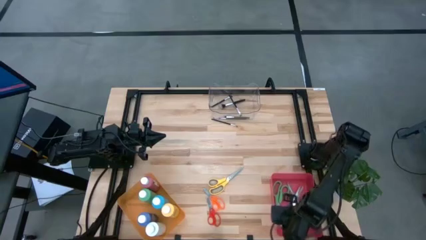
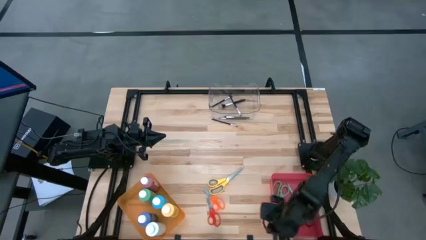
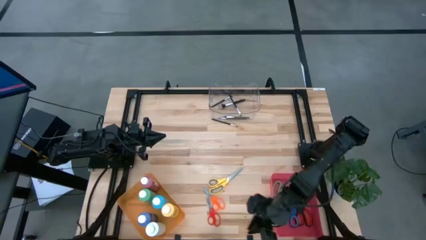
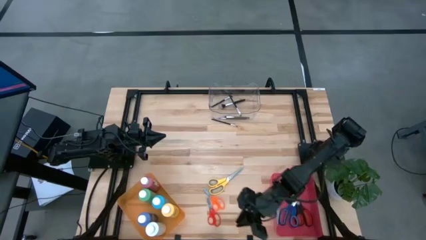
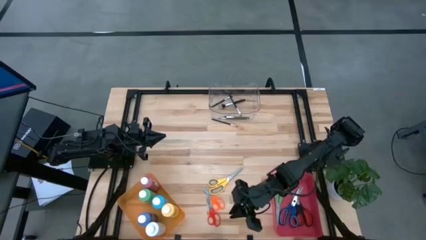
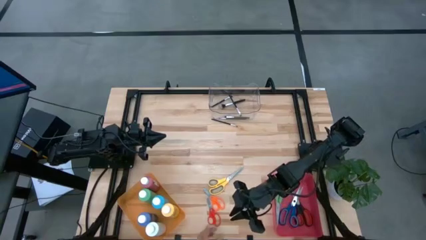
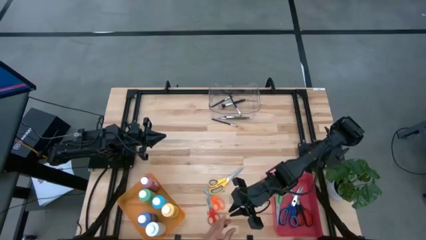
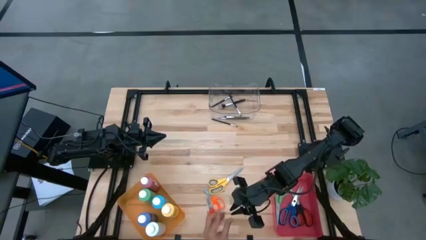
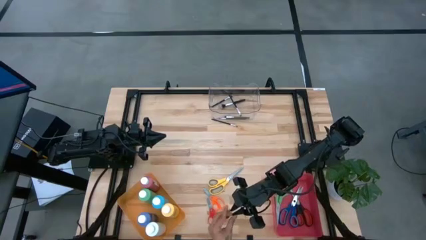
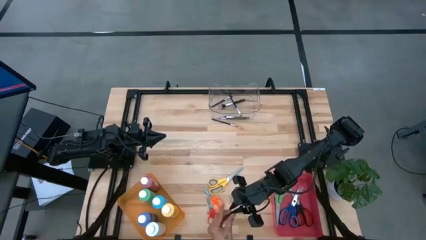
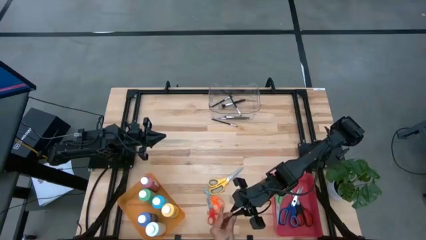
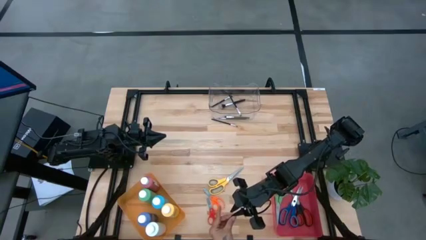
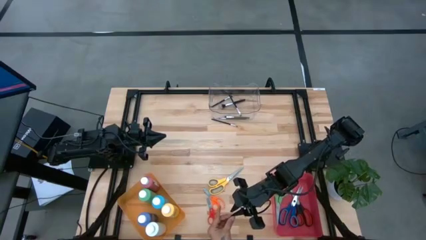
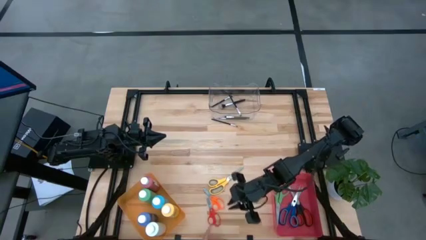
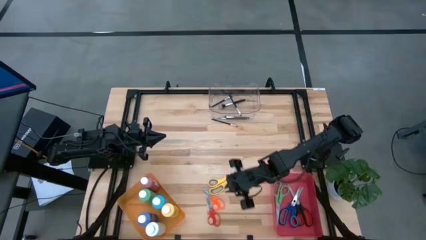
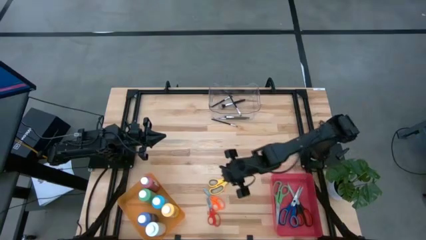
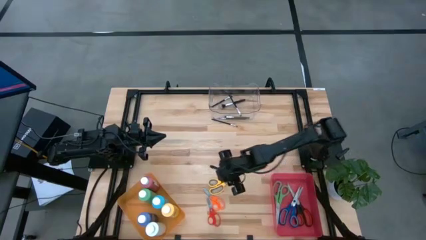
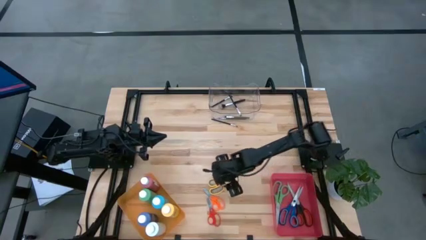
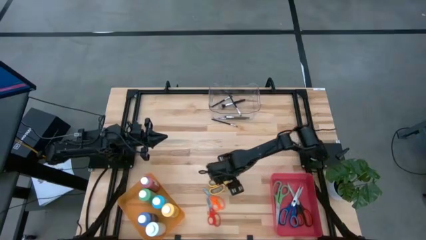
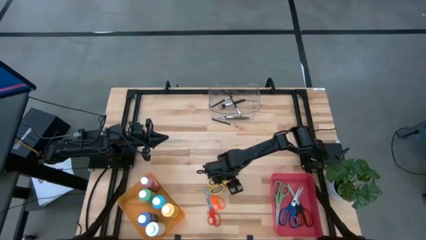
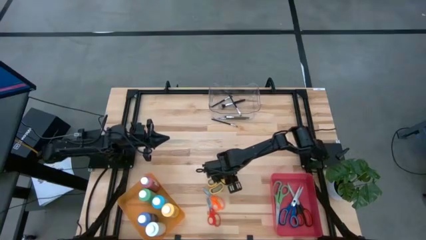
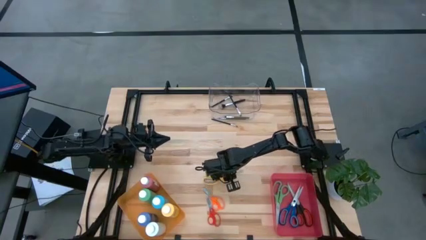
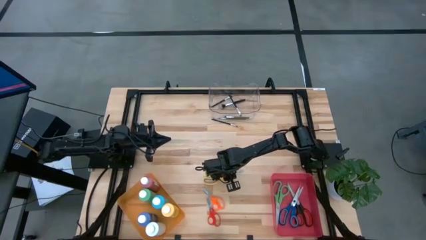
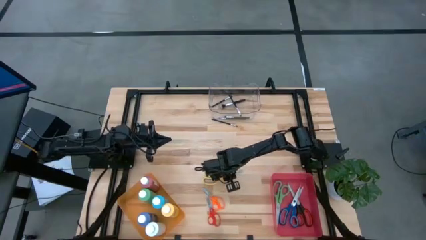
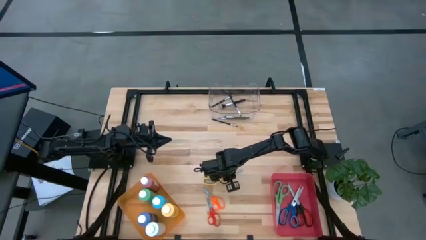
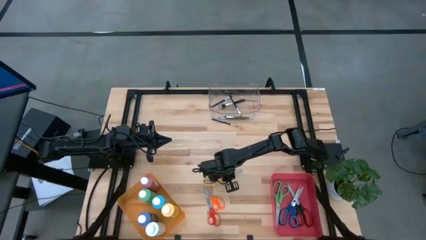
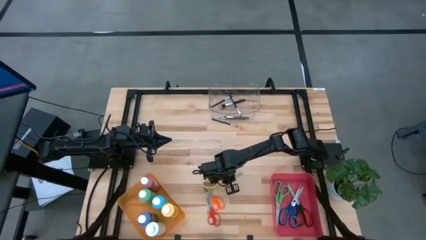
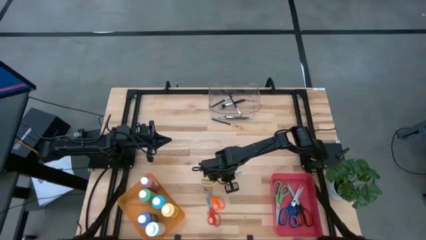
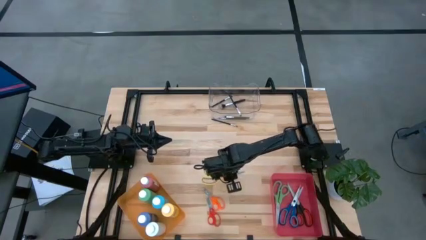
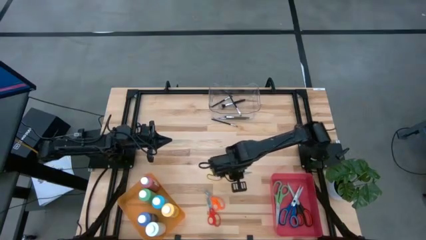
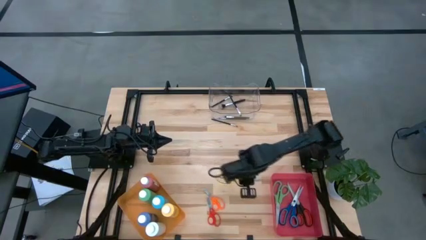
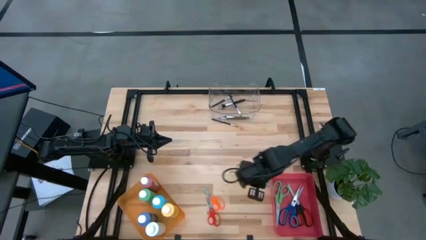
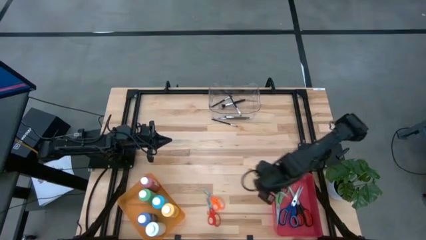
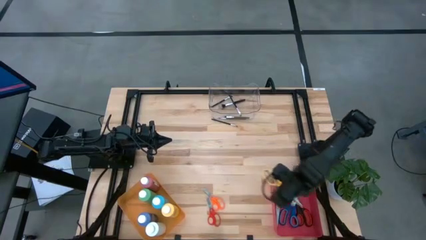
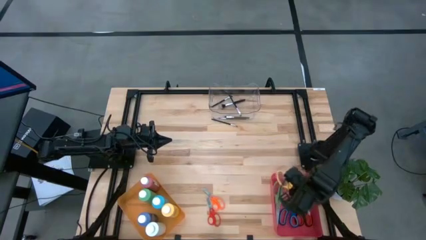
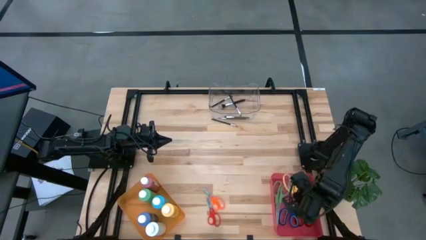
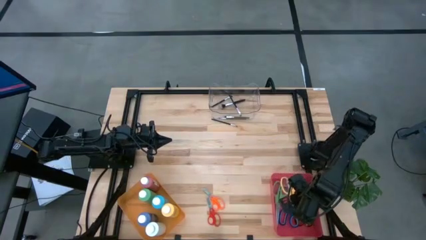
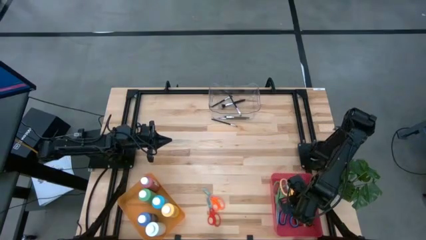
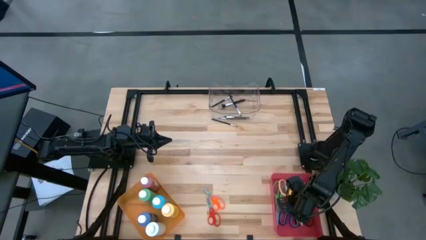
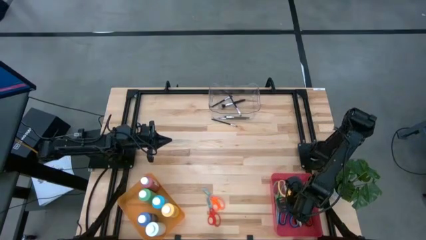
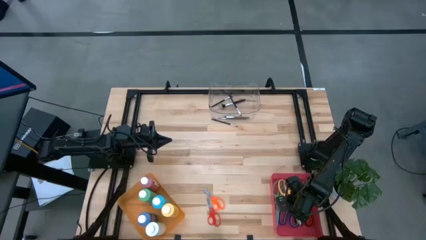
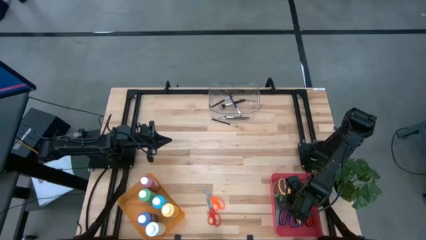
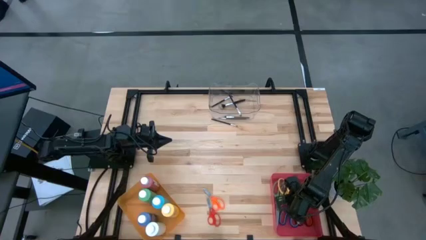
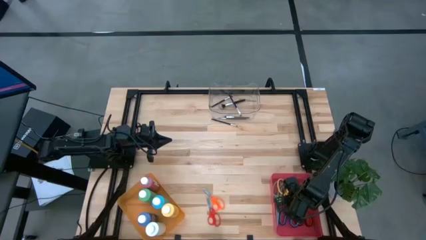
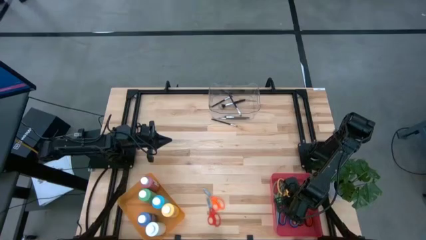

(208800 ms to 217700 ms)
Task: Pick & Place Paint Supplies
Put the yellow scissor into the red bin

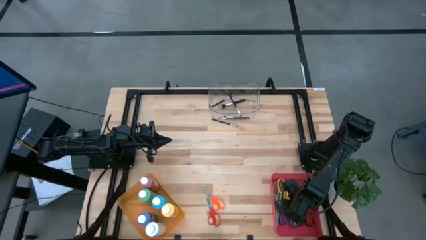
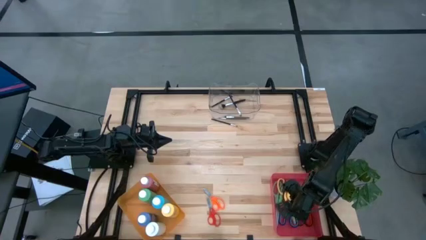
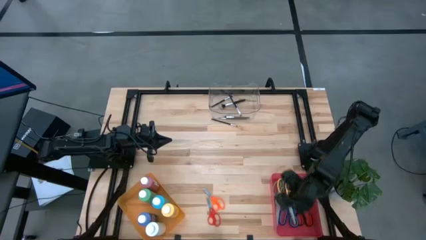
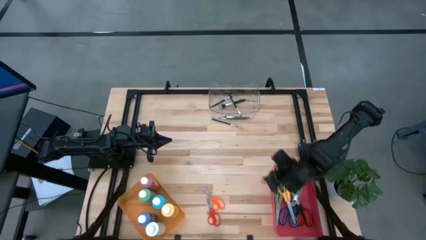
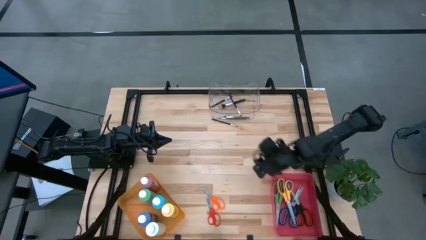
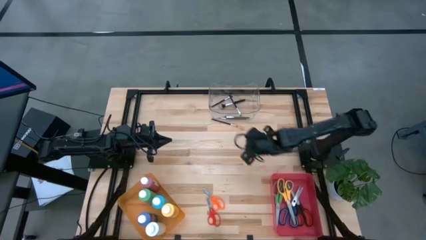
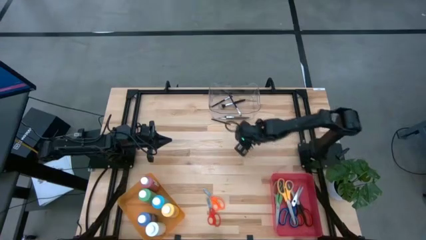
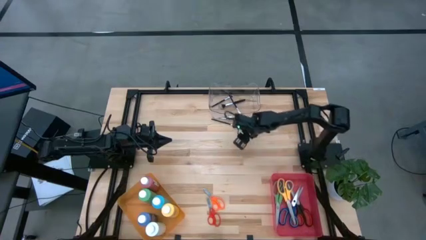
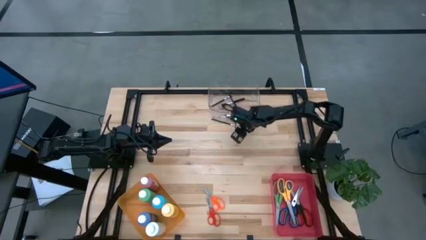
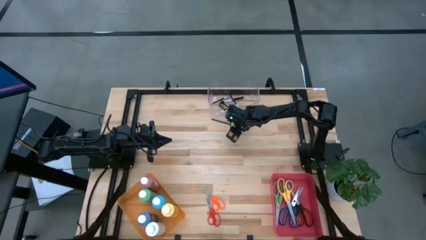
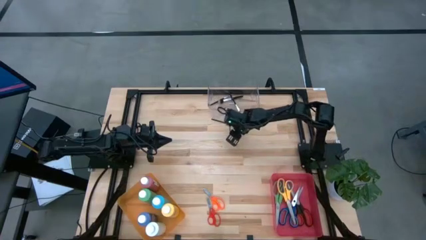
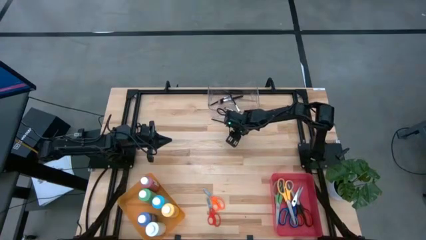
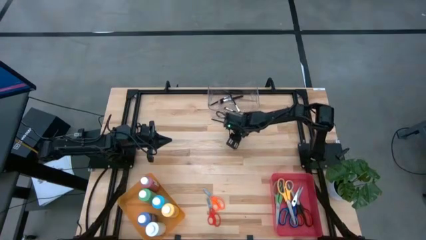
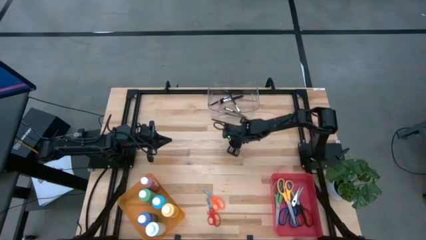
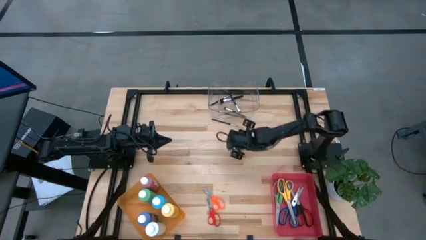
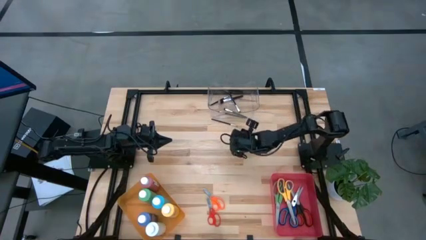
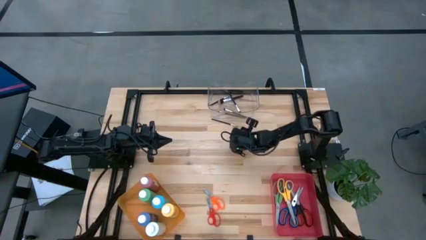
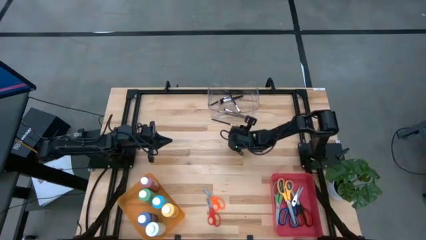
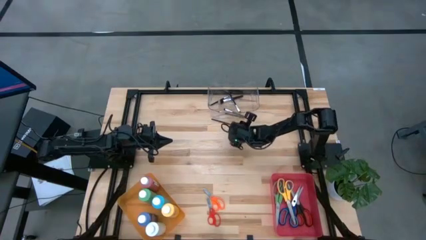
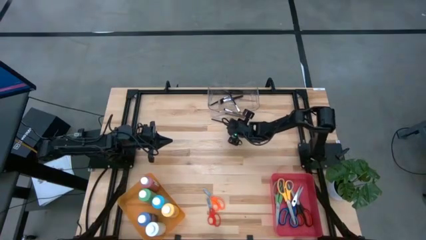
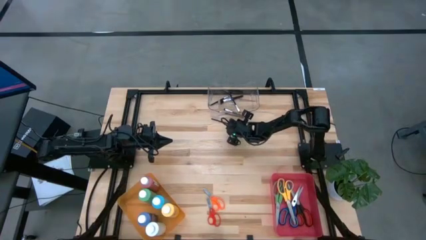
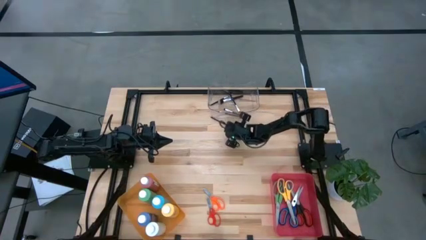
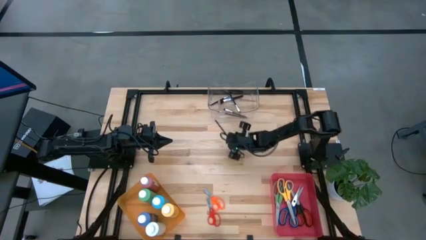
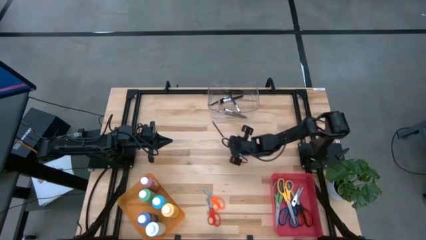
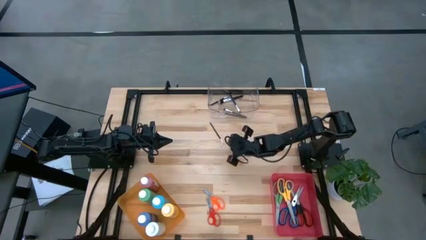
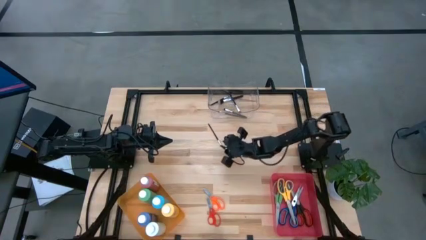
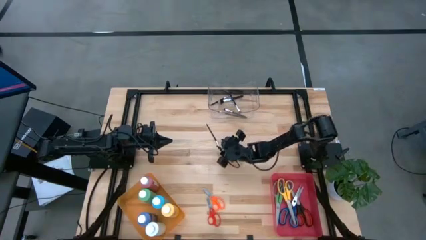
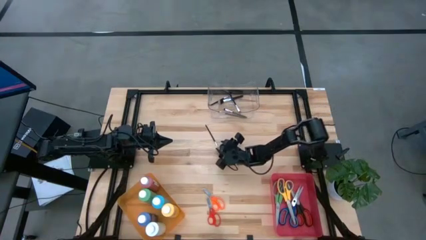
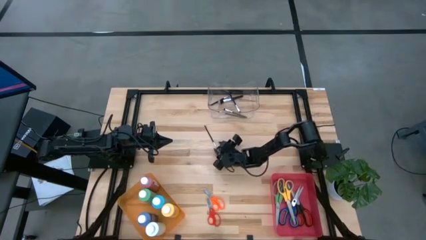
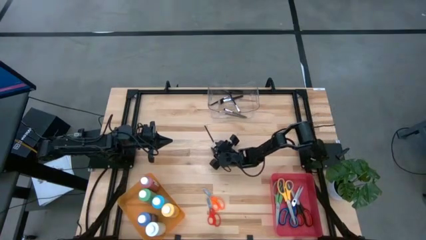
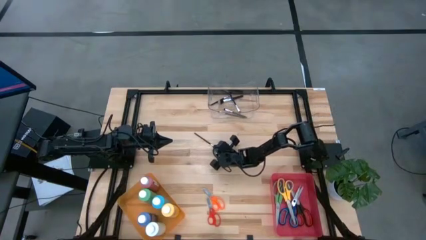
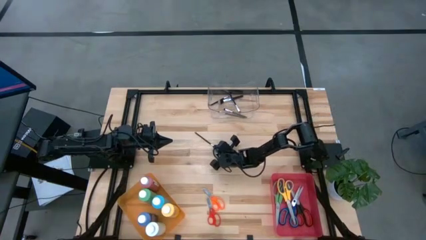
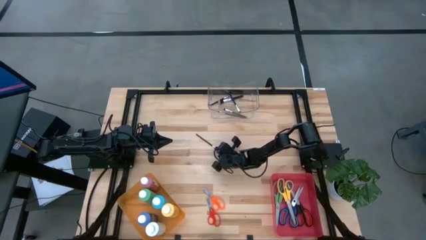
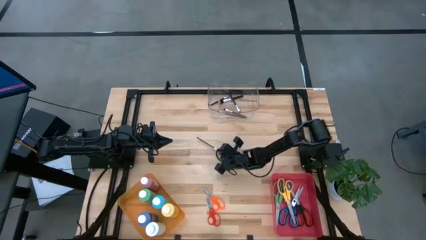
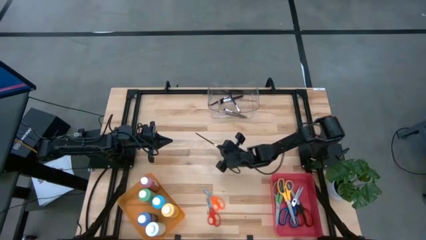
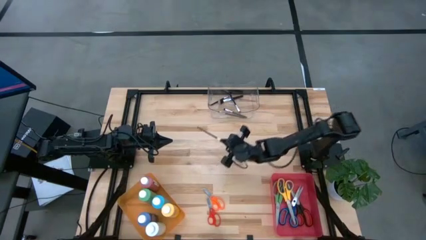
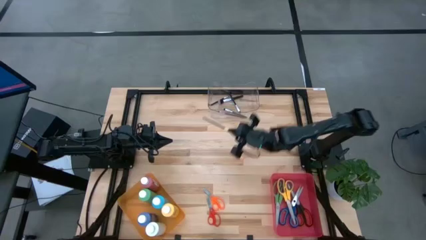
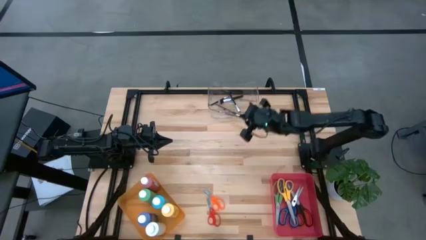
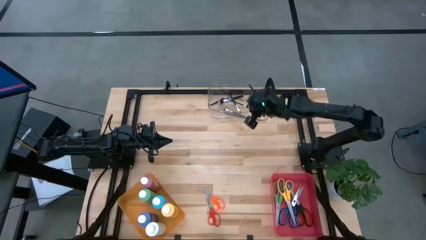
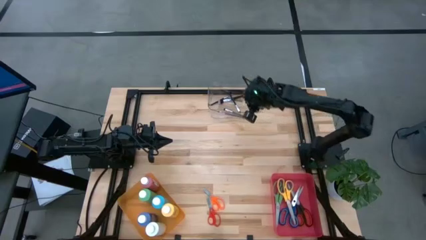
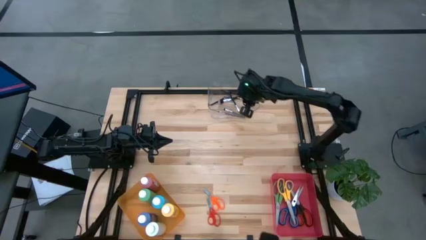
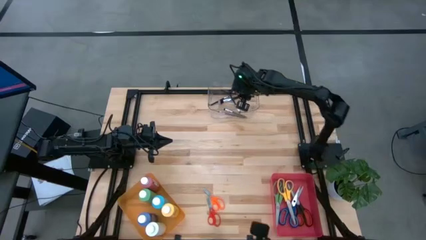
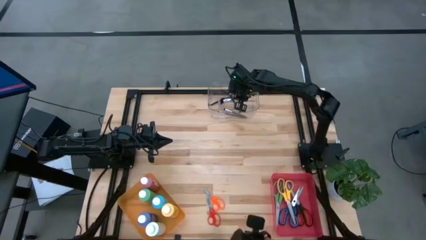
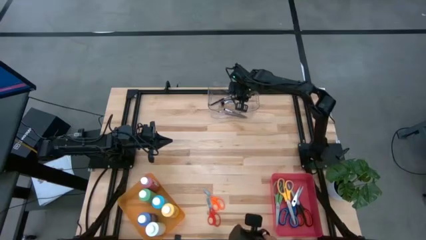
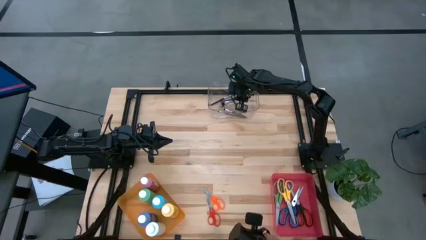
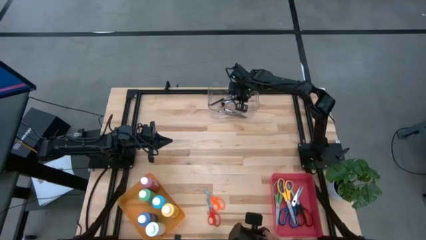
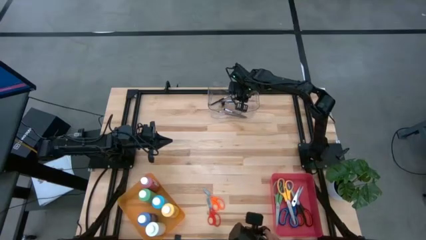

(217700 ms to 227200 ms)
Put the eyeshadow brush into the transparent bin
